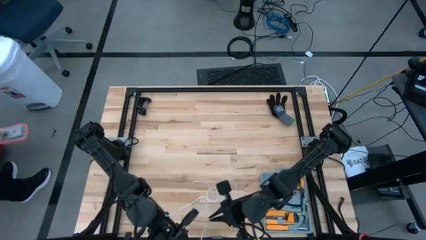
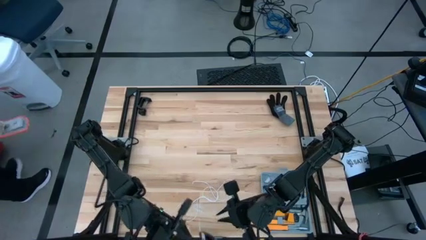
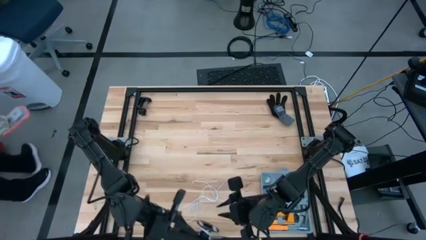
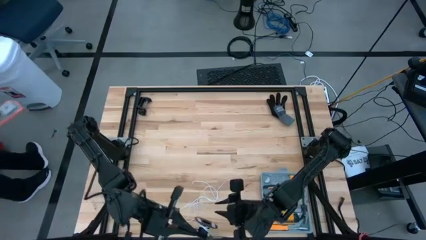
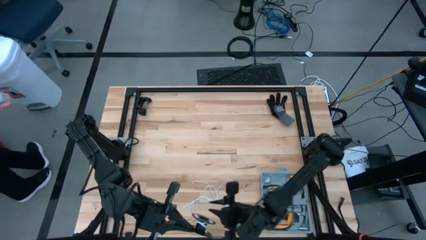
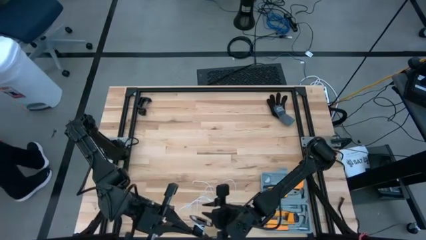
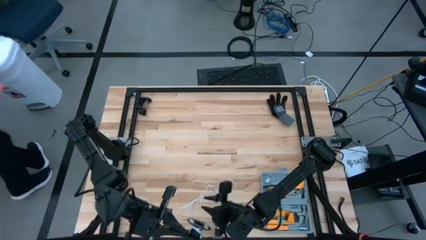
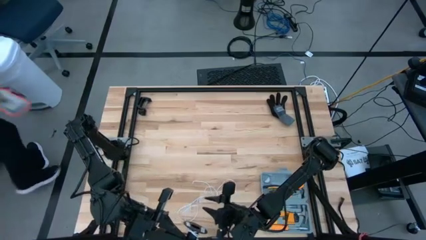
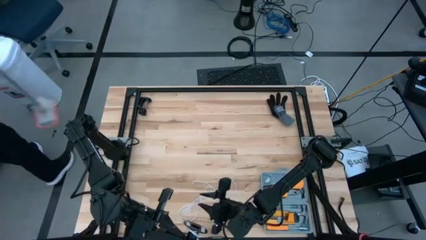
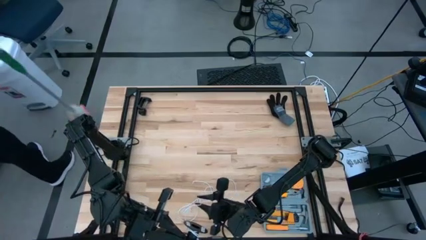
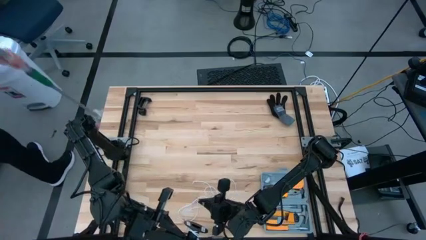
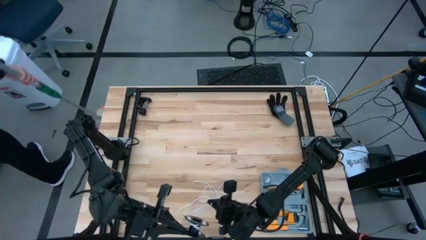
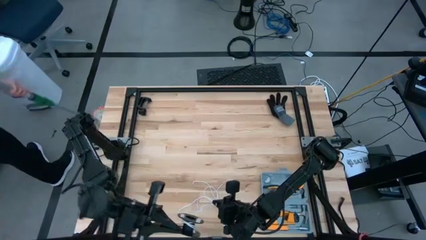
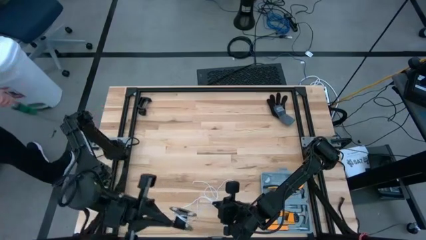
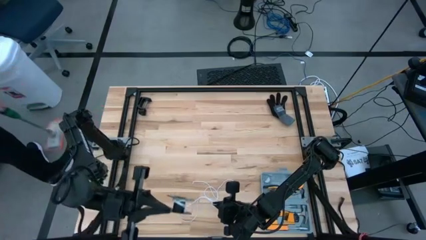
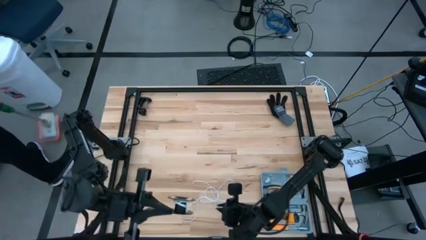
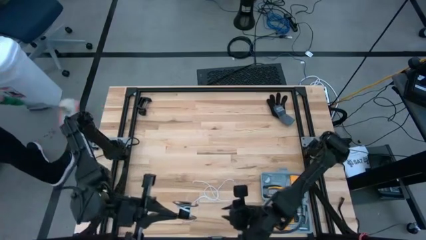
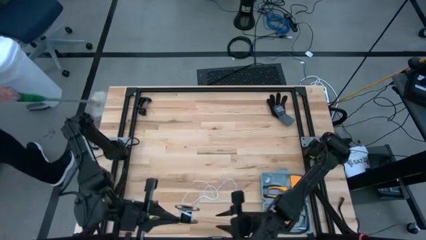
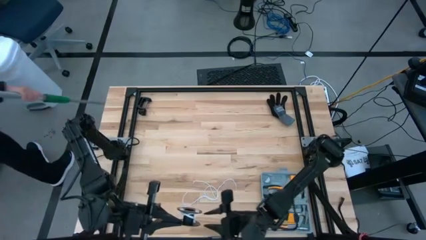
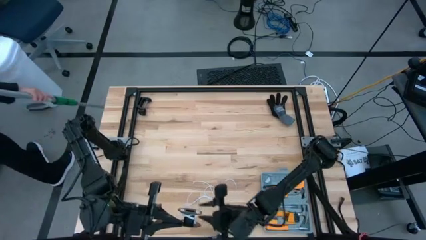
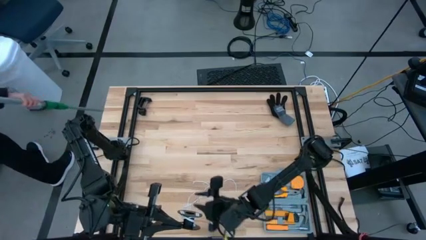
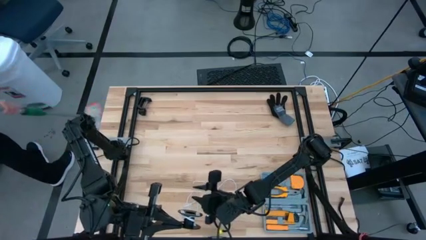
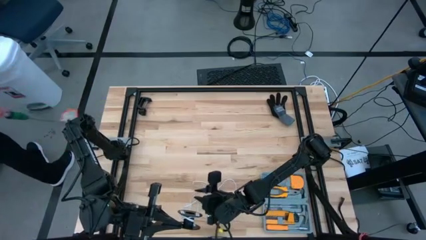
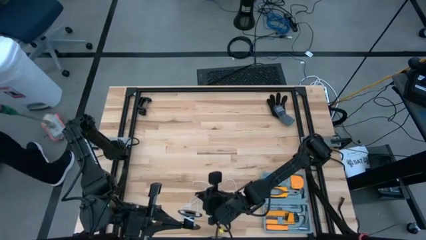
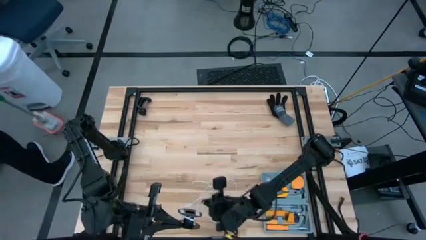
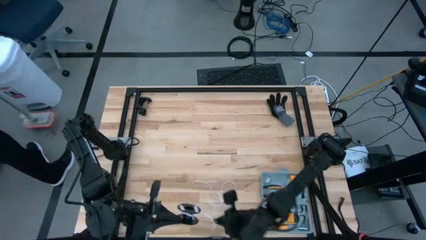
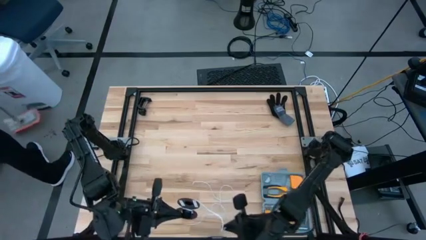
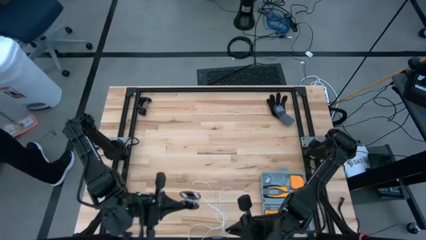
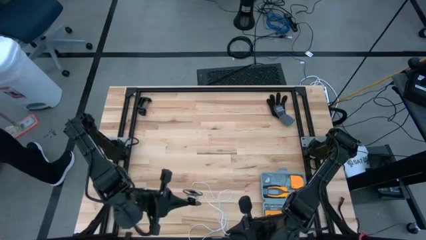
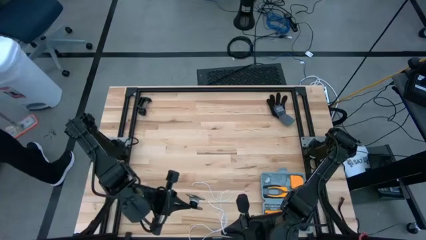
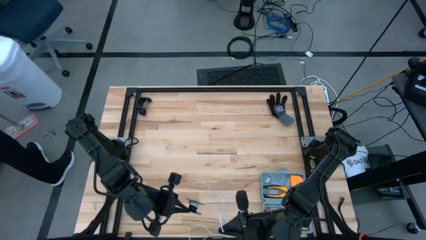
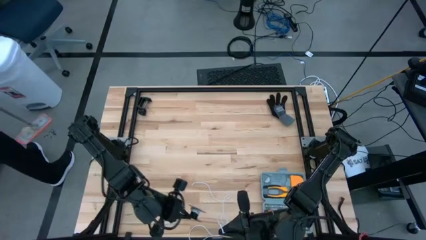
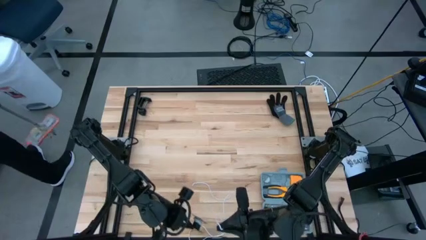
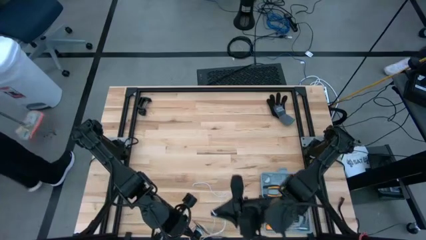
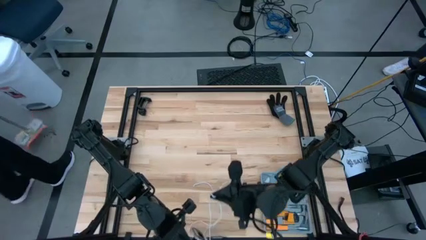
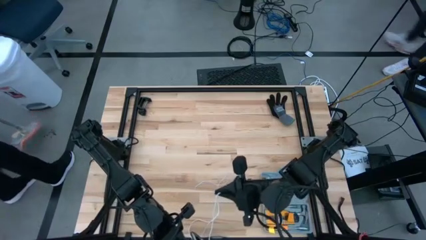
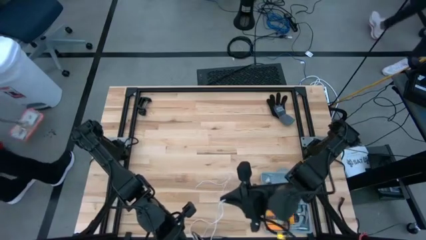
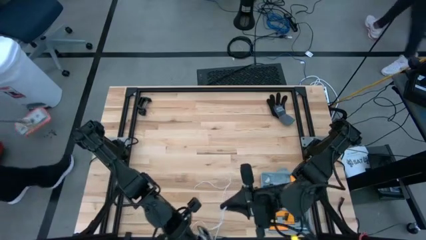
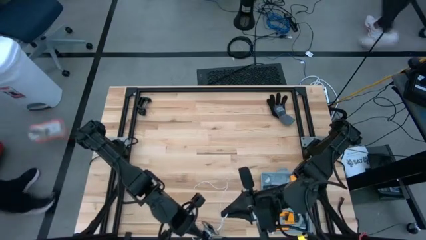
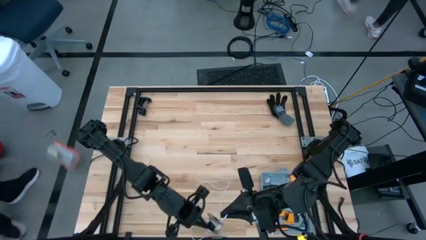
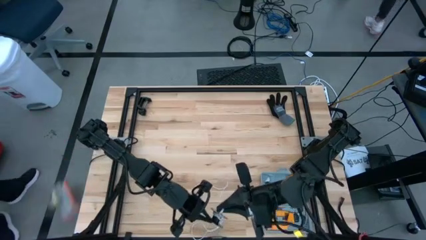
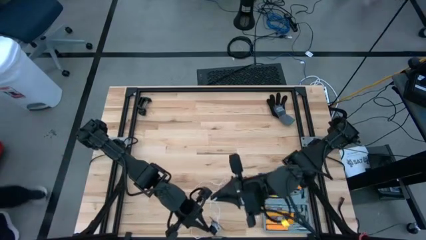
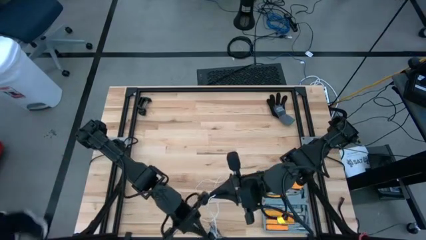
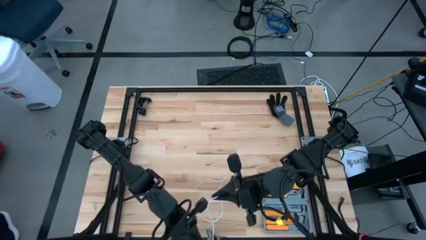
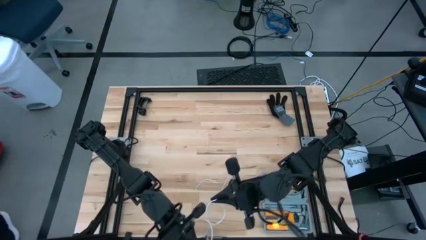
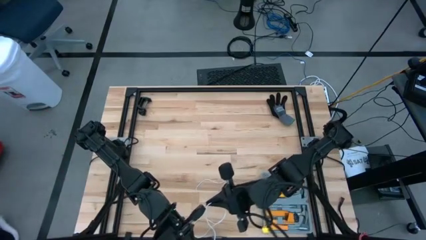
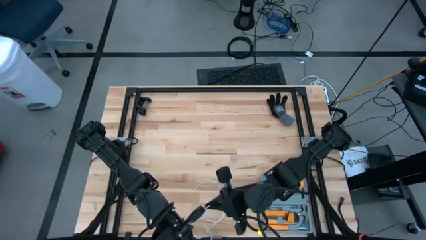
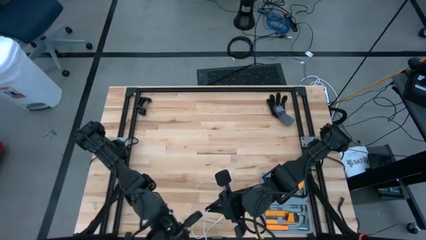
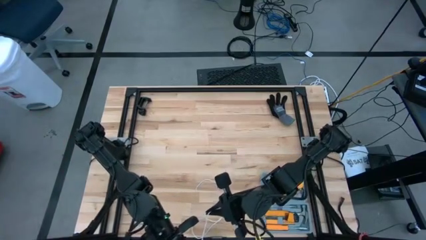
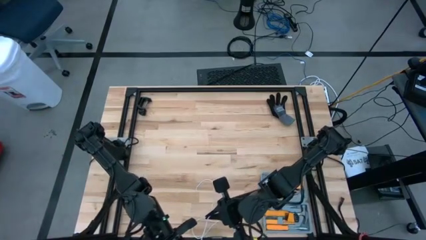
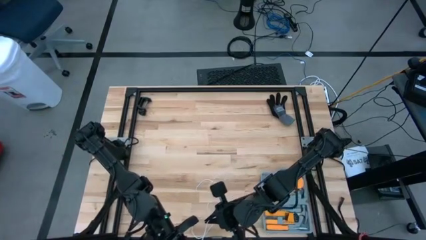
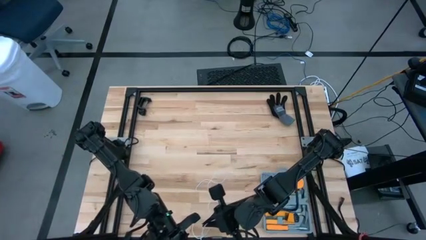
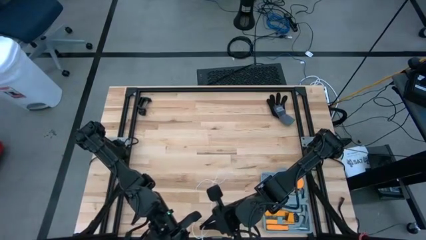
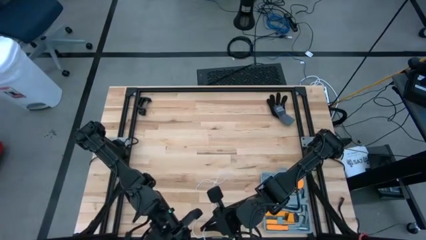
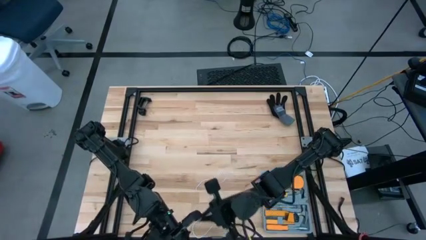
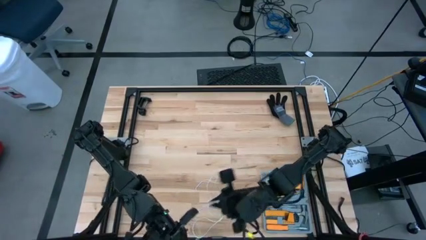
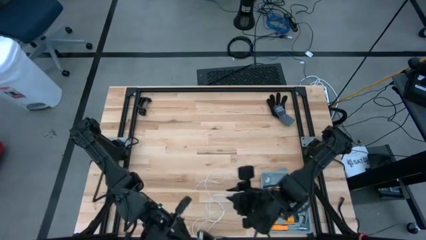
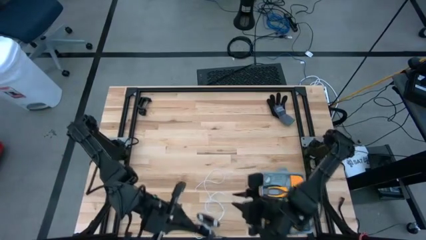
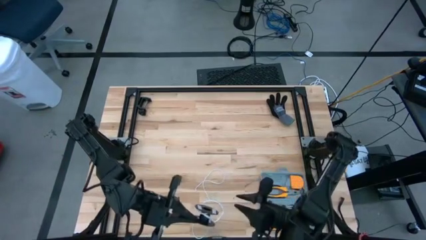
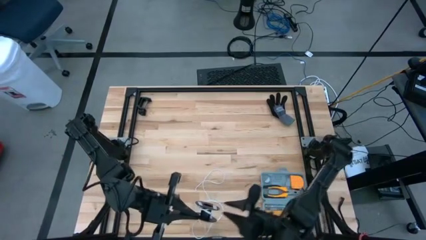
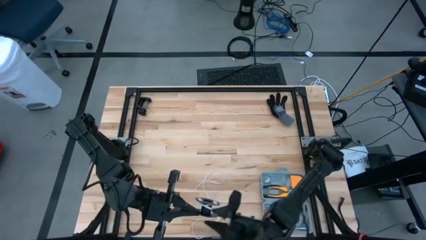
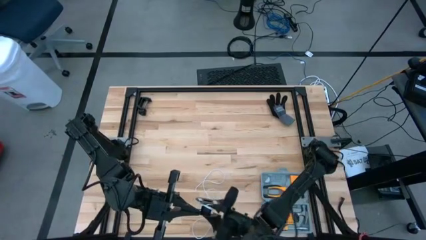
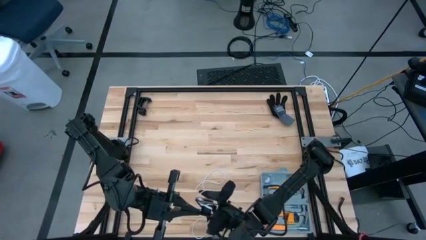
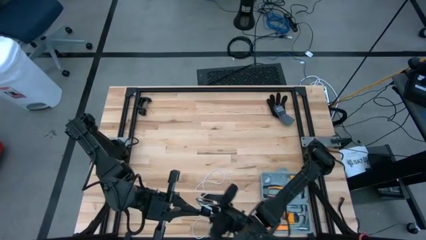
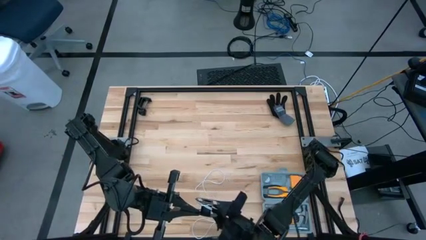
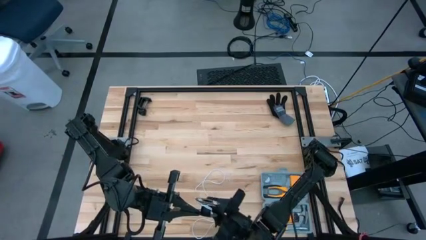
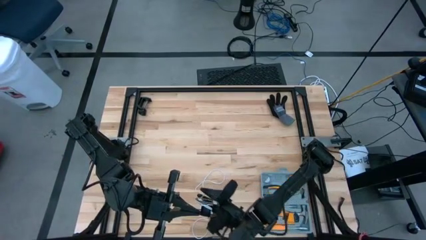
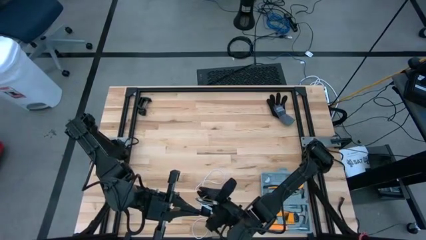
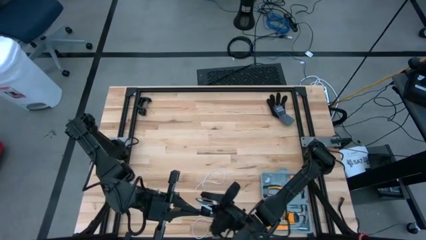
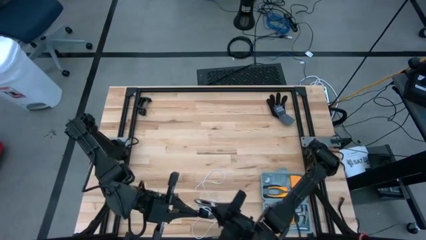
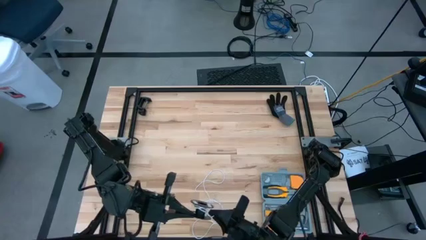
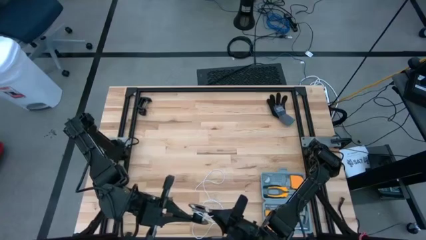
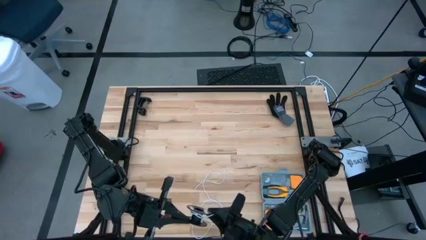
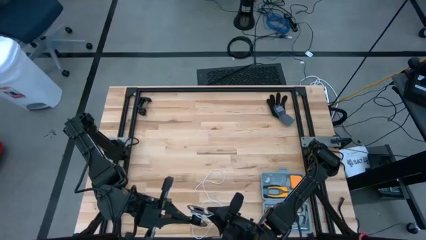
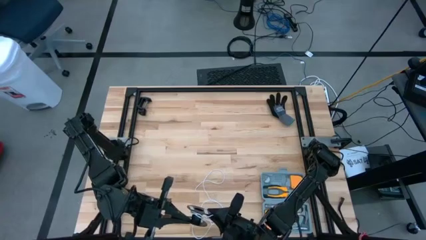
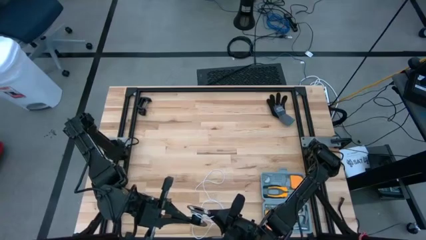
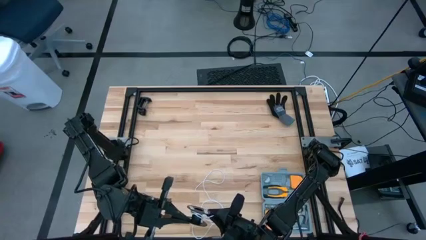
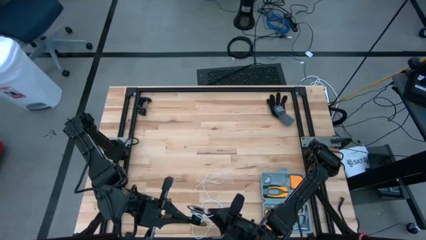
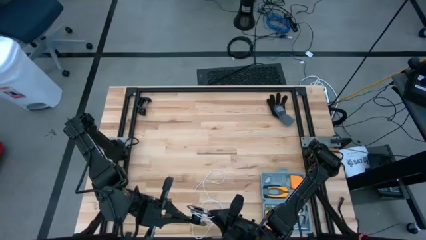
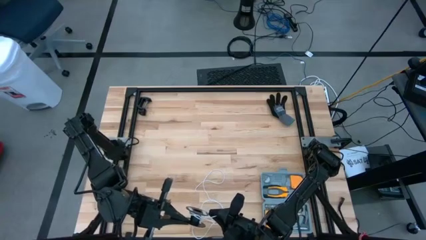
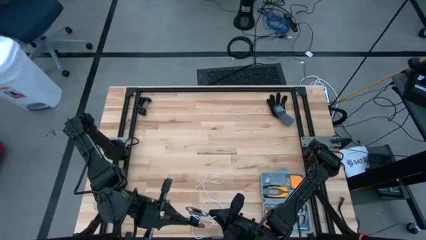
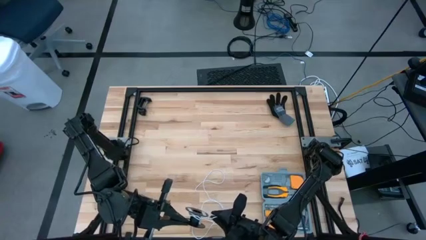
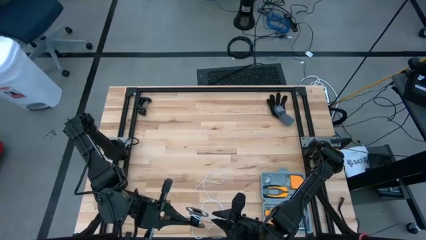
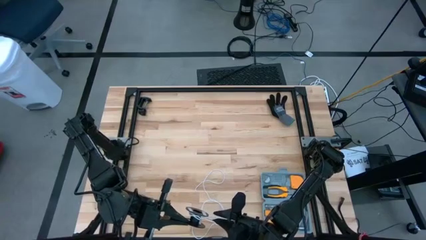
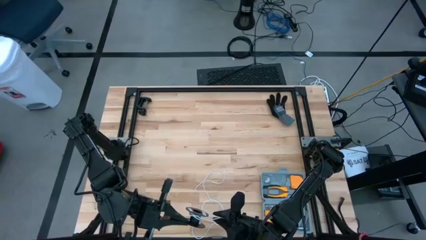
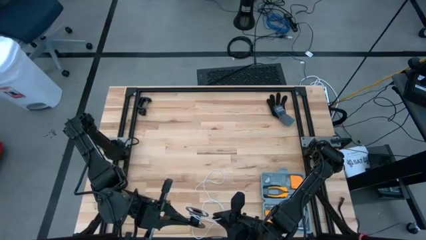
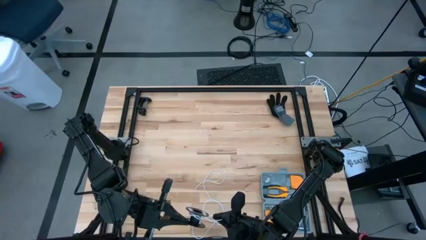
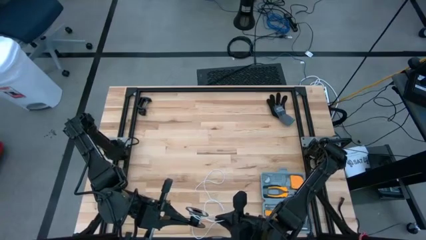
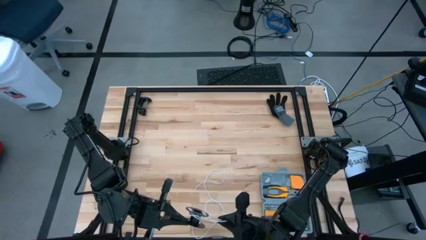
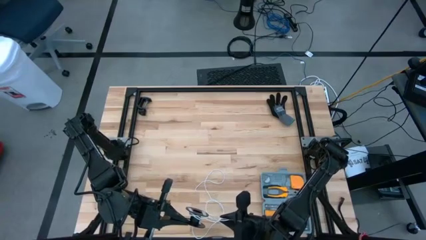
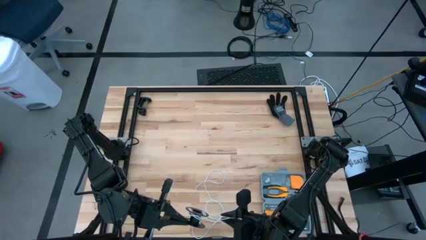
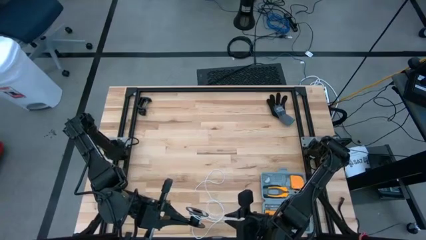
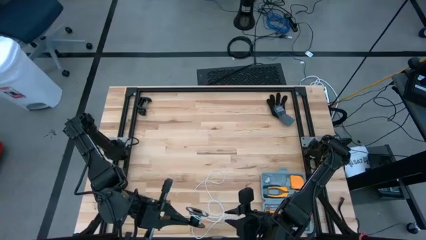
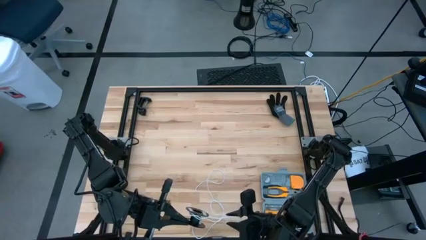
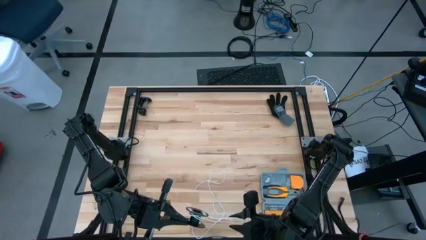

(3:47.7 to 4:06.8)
Task: Coil cords
Coil the white cable wire onto the spool
